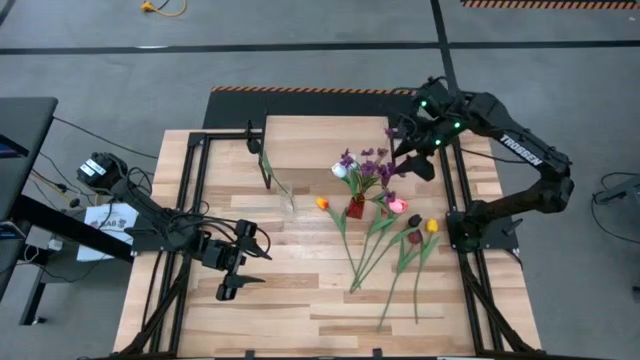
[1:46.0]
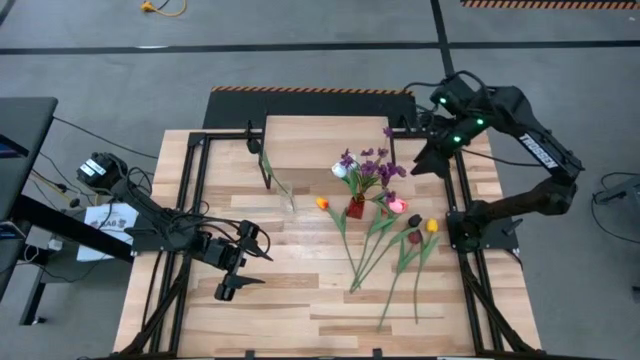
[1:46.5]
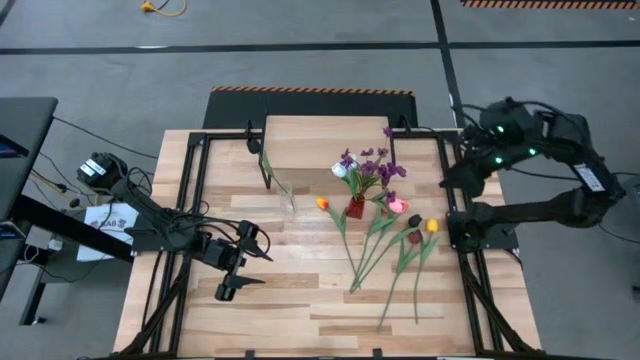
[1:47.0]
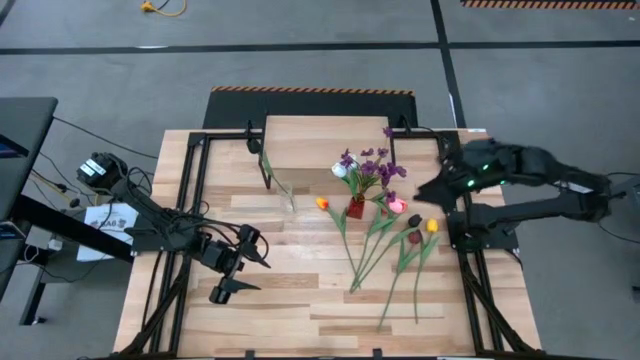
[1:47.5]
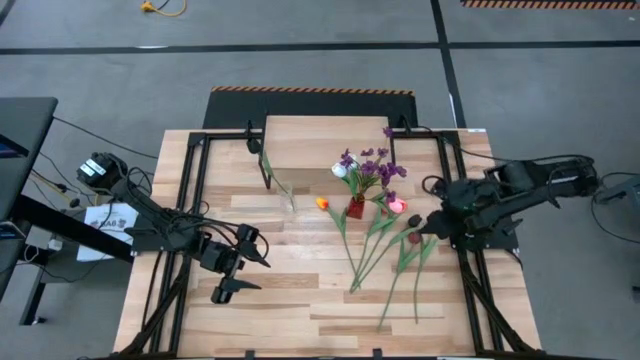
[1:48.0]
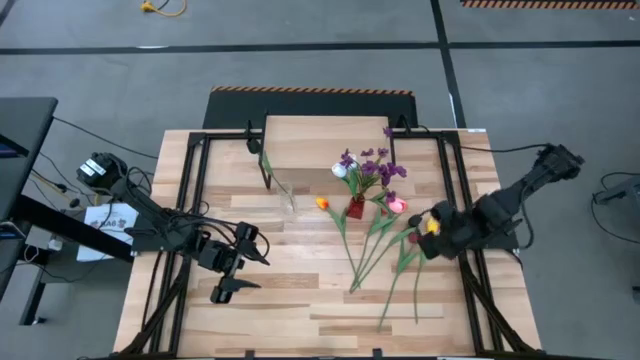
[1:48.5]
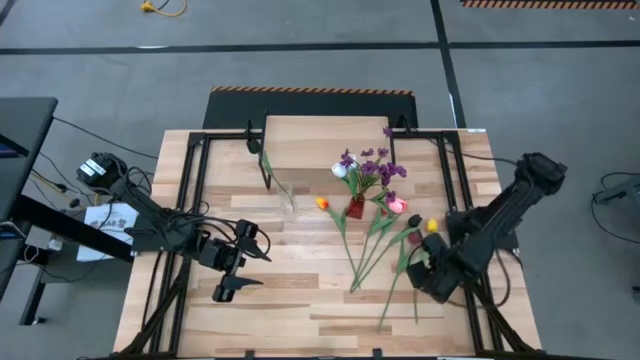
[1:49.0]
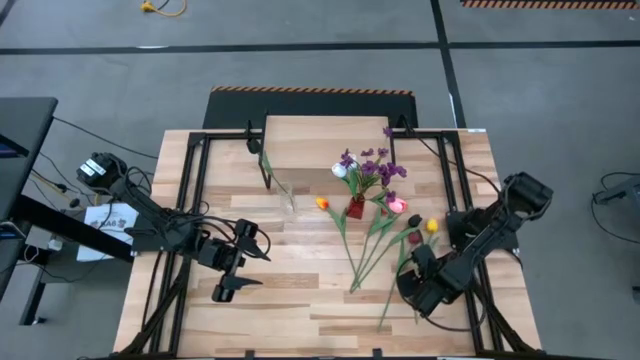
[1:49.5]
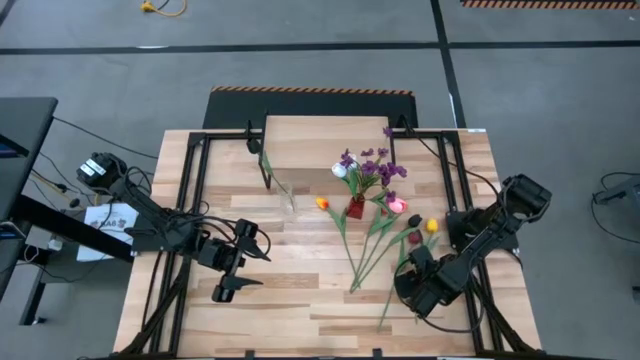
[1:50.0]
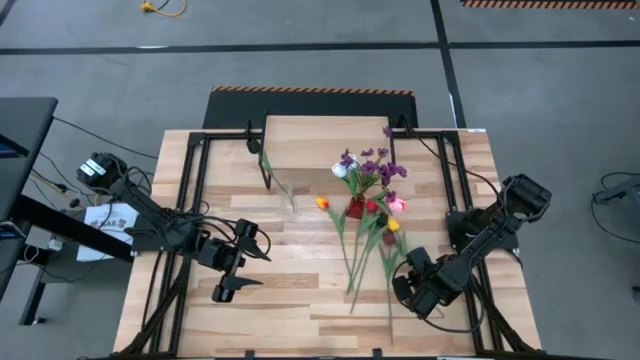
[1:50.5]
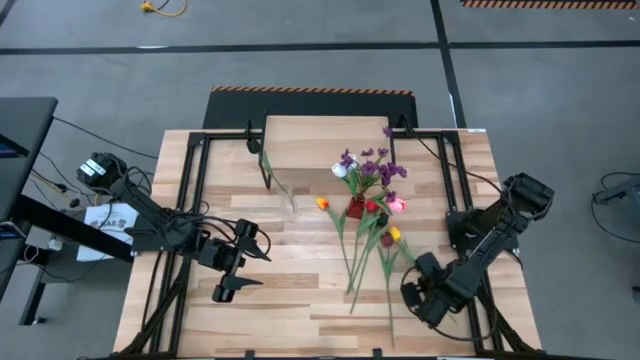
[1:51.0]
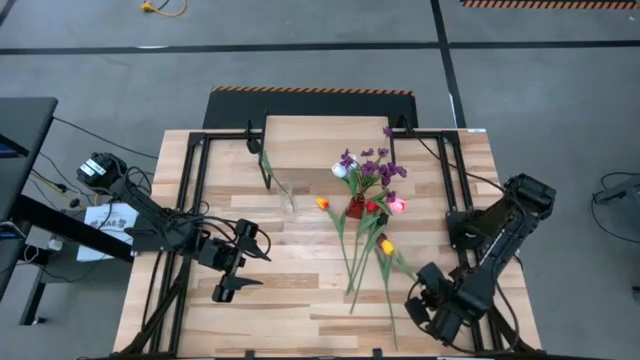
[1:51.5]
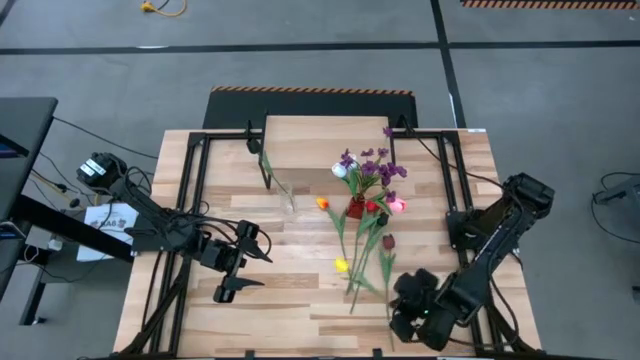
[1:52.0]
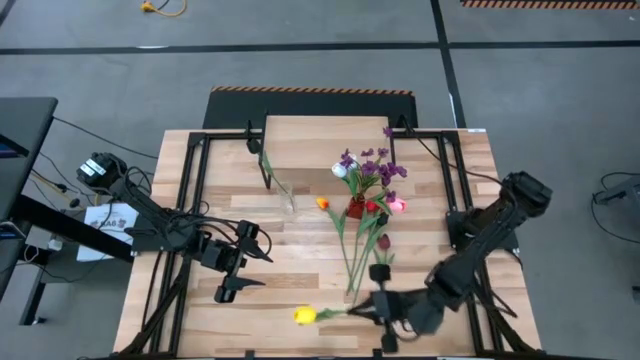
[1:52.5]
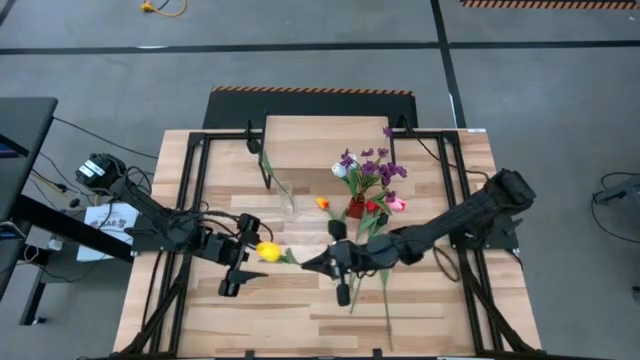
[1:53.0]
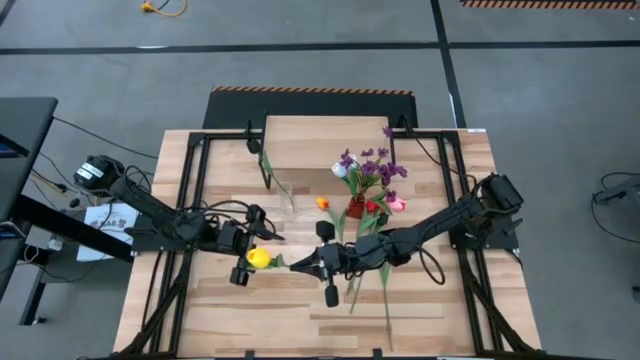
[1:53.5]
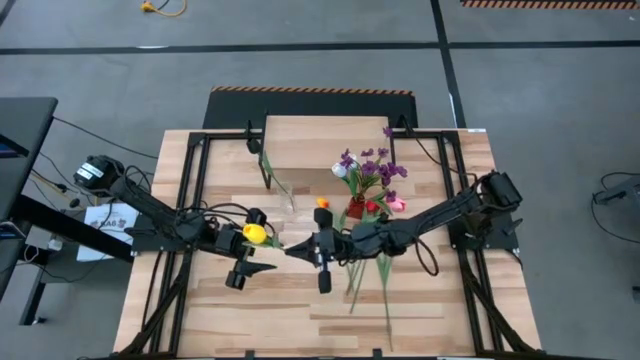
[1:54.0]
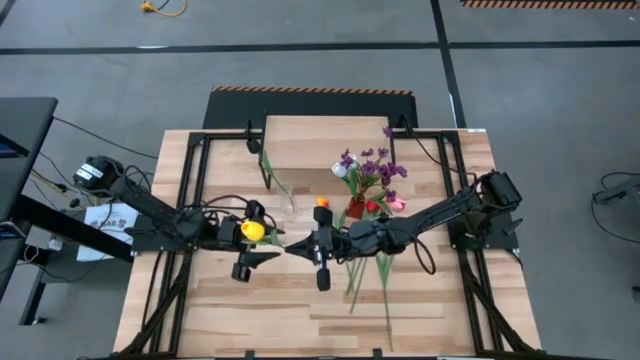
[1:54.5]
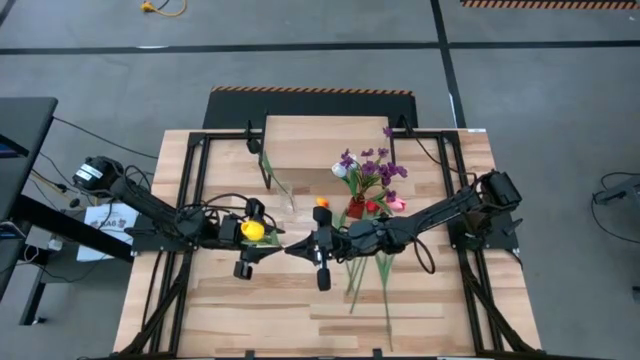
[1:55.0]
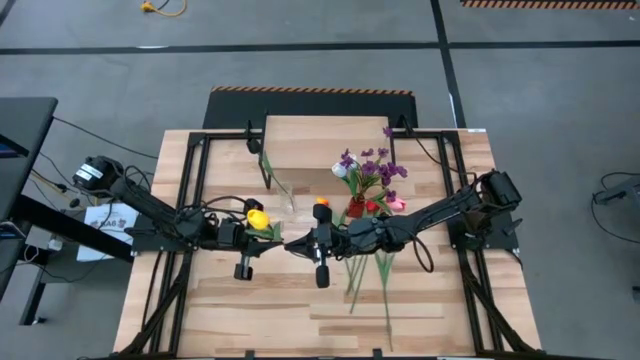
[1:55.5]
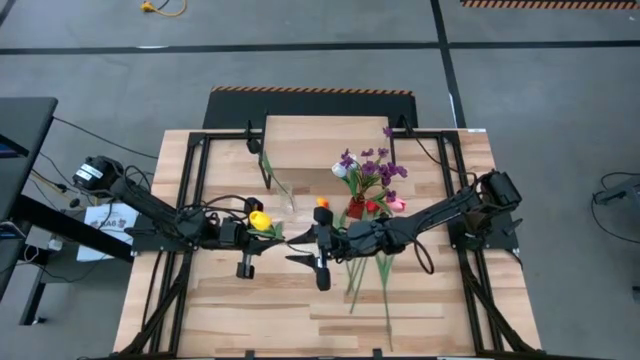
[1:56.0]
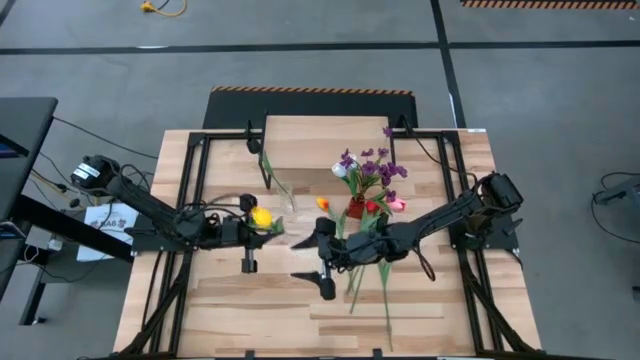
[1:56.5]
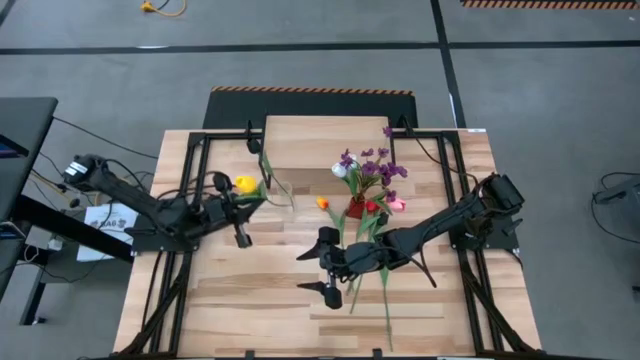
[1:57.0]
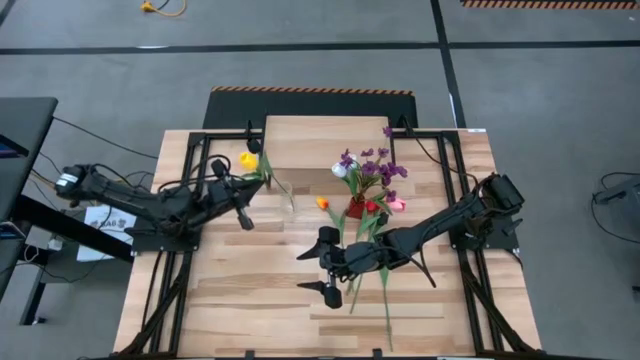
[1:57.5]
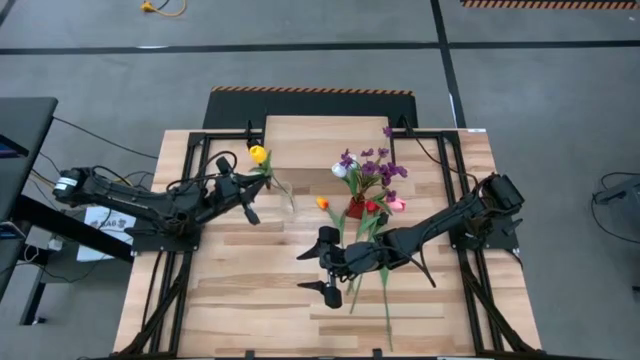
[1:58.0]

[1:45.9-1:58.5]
Task: Pick and place flowers into a vace then onto a shelf
Put the left yellow flower into the transparent vase

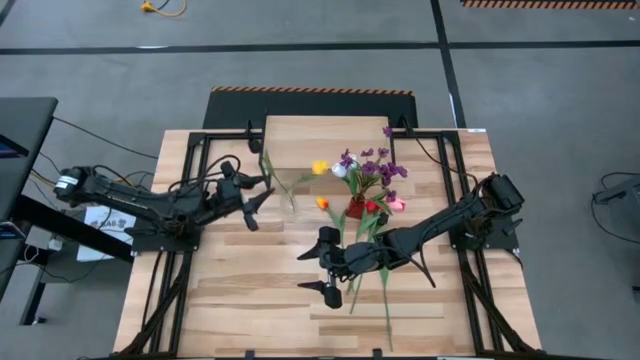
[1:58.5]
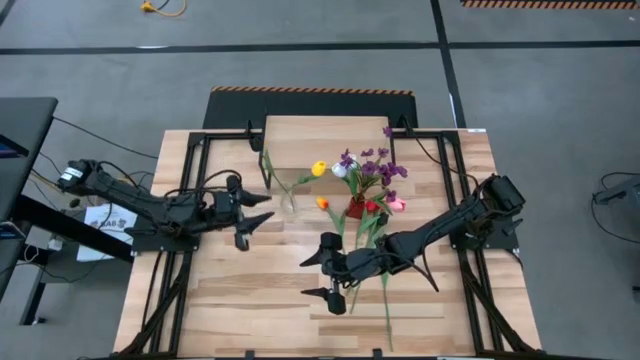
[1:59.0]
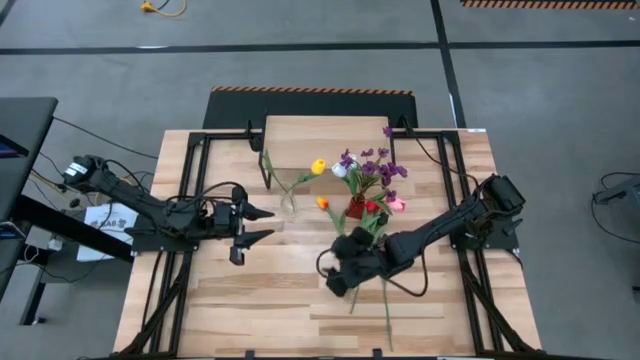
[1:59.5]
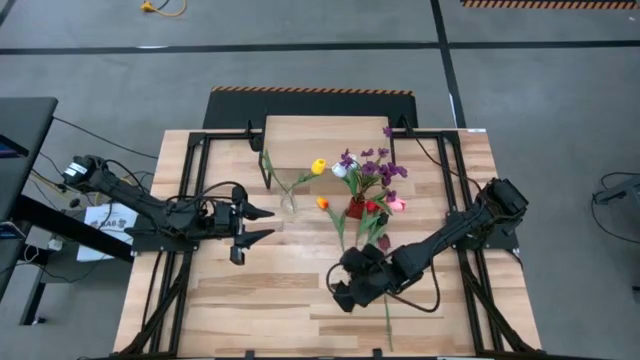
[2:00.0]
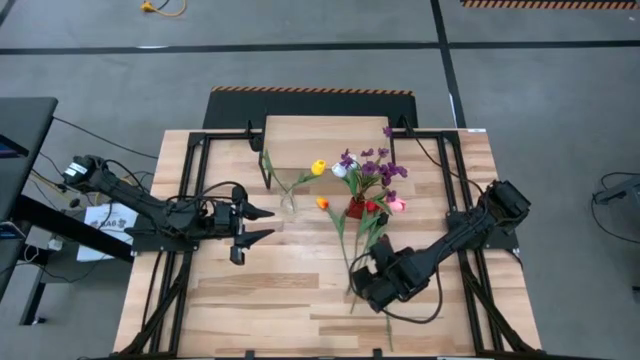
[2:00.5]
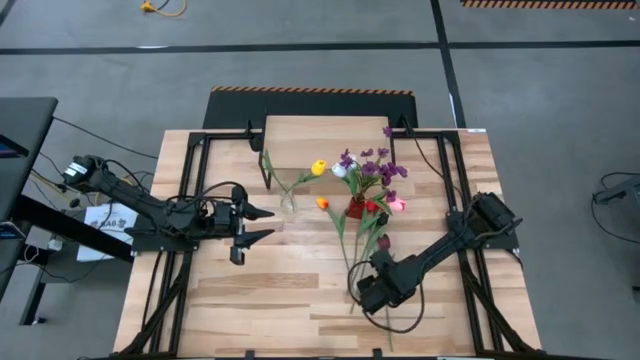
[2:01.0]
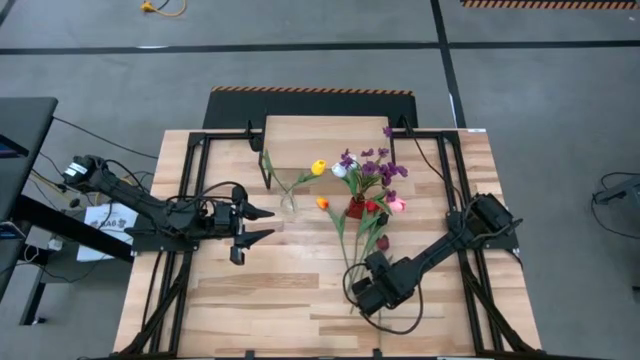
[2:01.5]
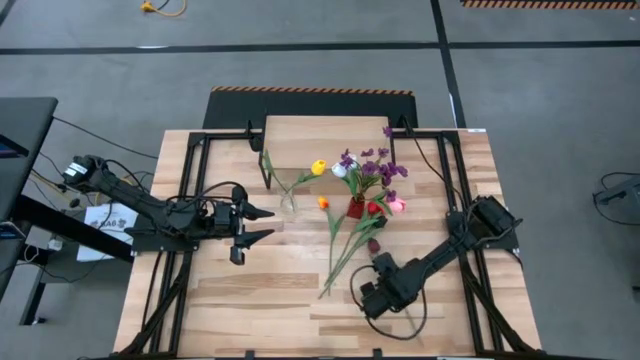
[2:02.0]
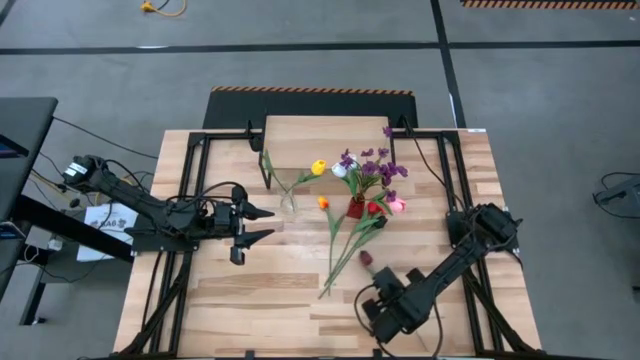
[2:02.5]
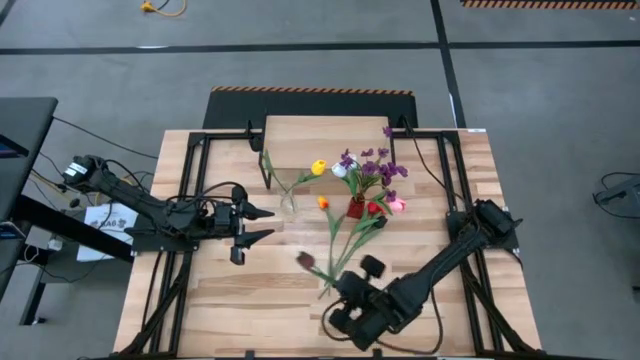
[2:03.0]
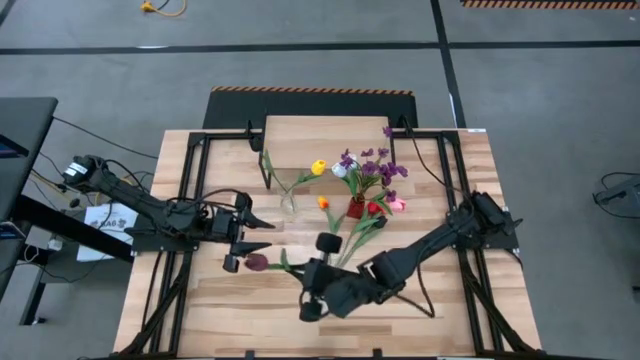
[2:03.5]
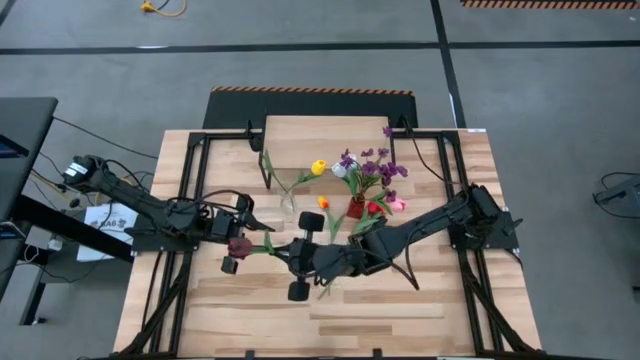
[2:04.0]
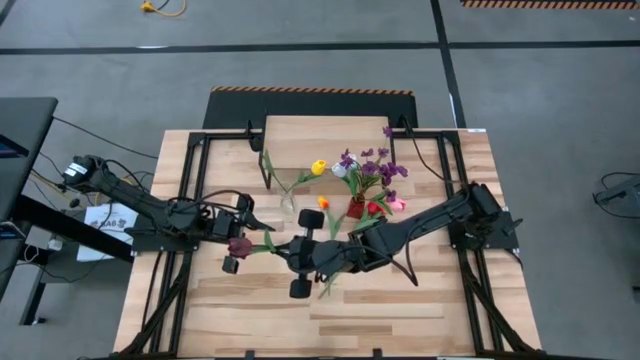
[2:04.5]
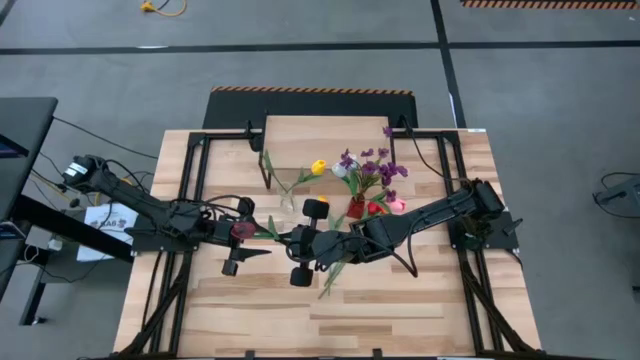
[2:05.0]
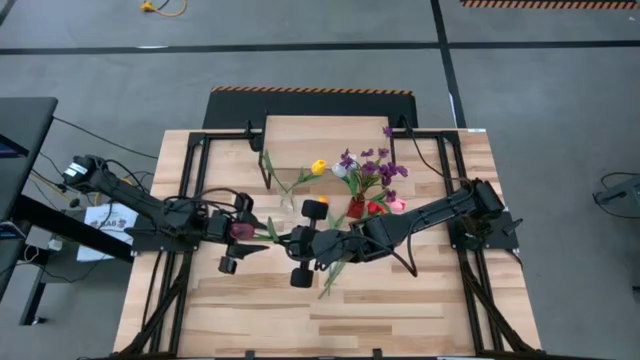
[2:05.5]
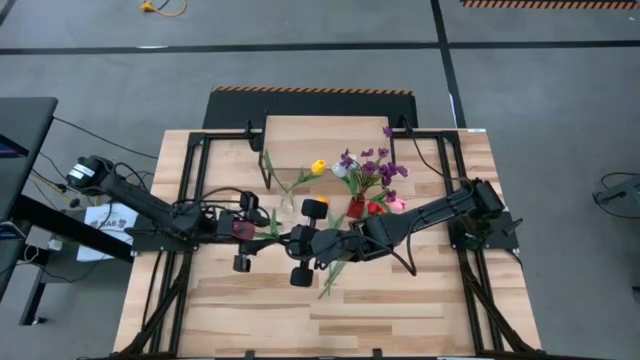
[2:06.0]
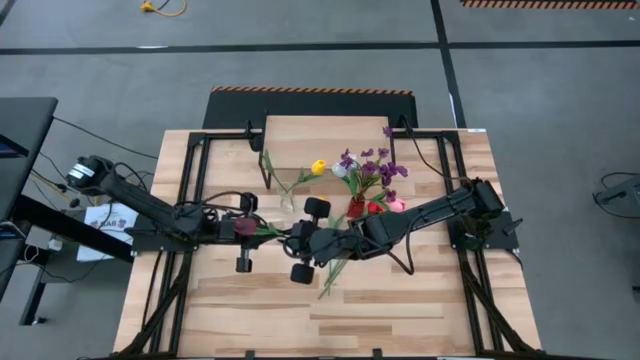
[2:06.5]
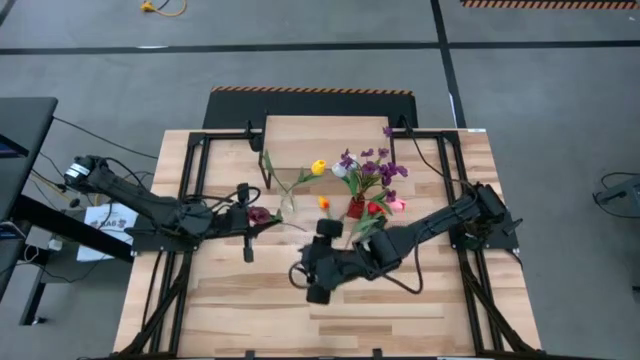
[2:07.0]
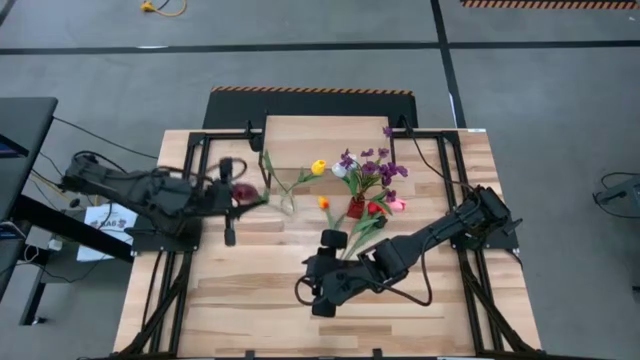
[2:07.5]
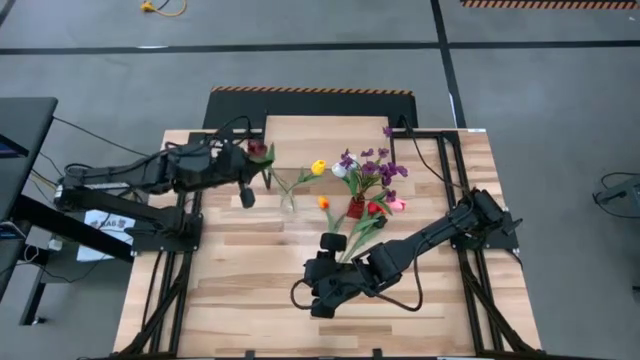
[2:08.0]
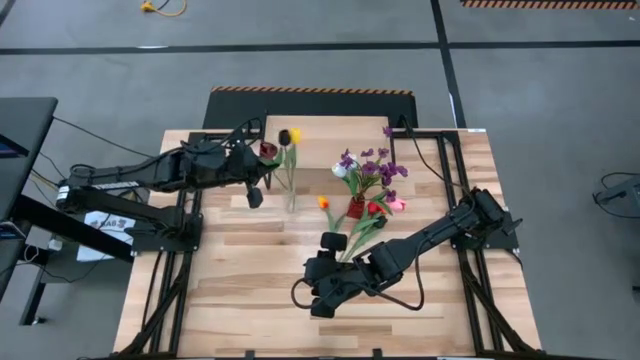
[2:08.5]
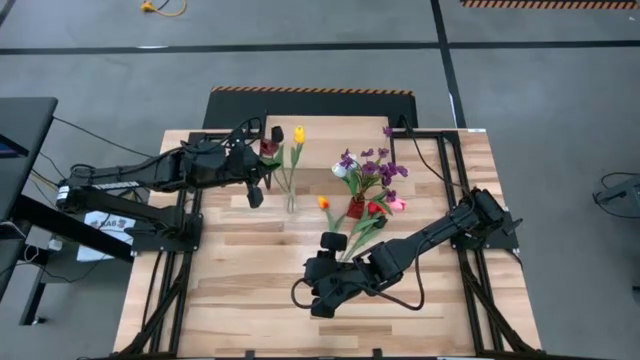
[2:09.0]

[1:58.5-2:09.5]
Put the dark red flower into the transparent vase
